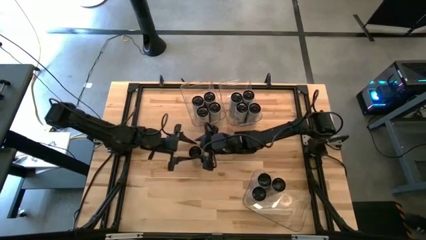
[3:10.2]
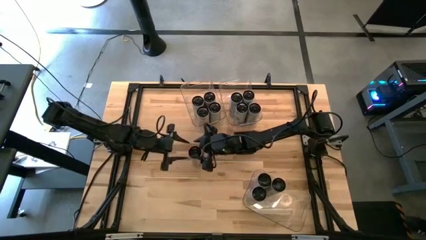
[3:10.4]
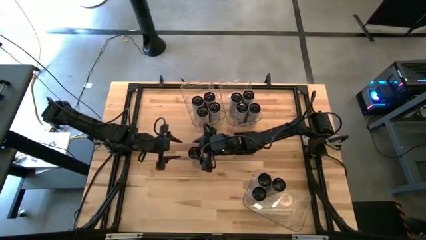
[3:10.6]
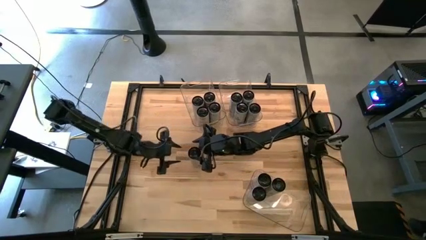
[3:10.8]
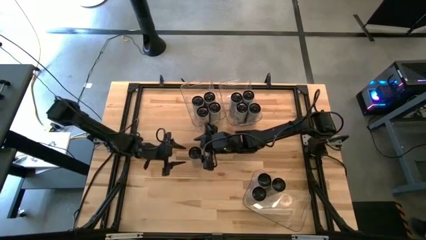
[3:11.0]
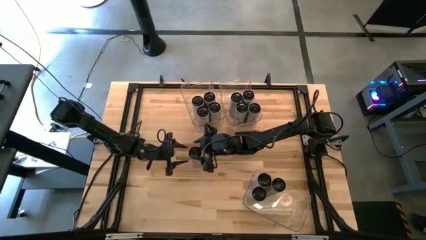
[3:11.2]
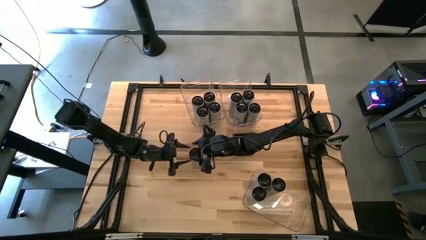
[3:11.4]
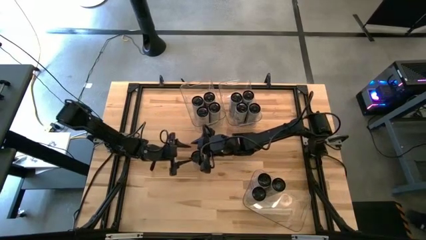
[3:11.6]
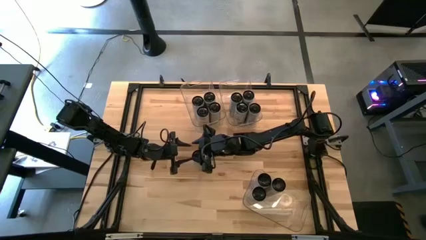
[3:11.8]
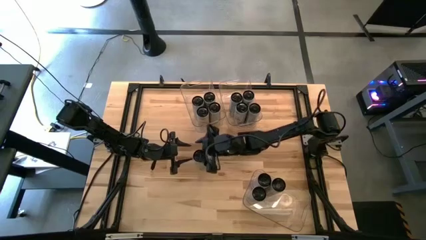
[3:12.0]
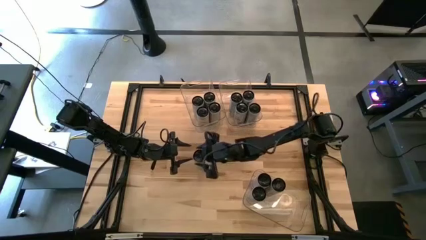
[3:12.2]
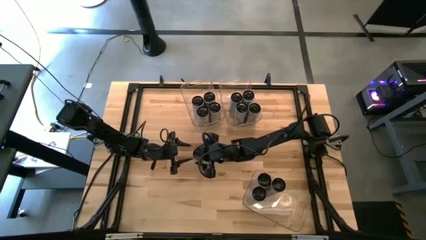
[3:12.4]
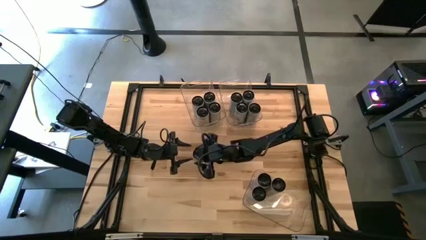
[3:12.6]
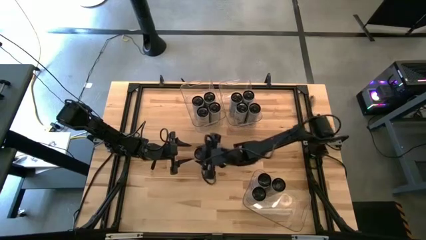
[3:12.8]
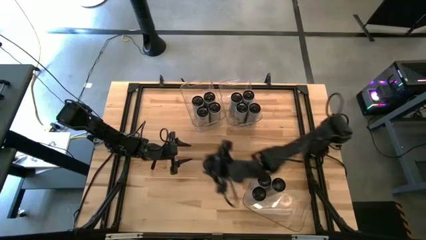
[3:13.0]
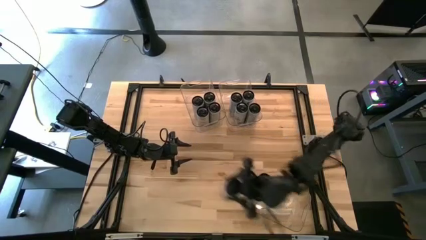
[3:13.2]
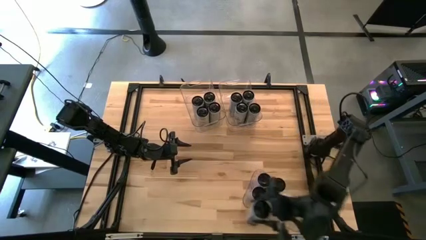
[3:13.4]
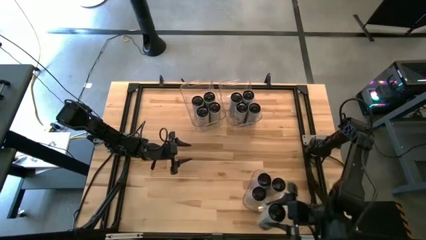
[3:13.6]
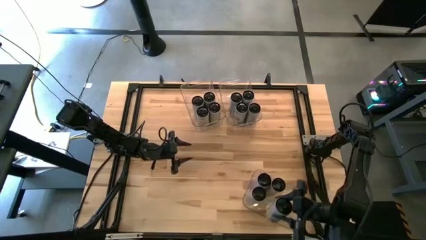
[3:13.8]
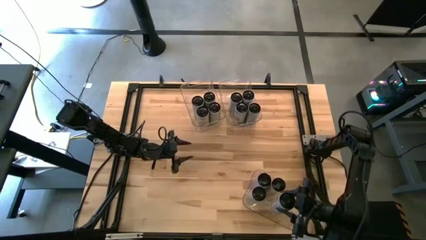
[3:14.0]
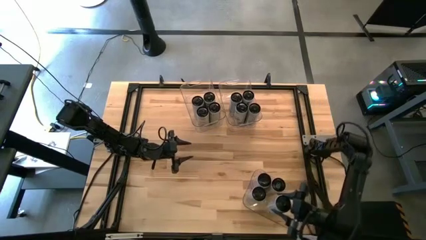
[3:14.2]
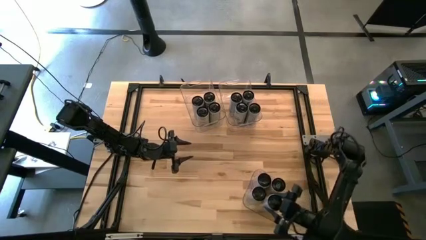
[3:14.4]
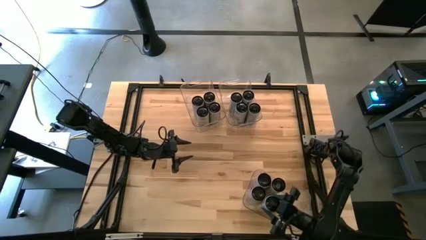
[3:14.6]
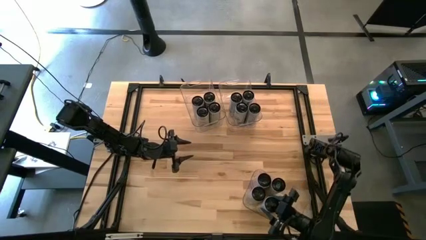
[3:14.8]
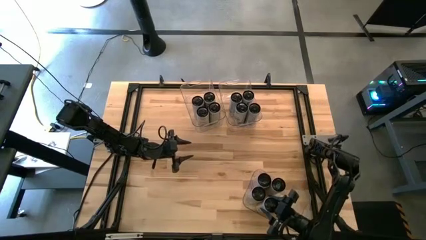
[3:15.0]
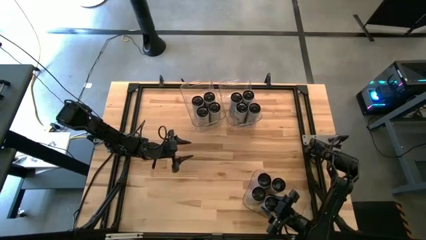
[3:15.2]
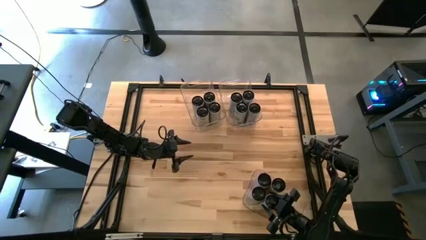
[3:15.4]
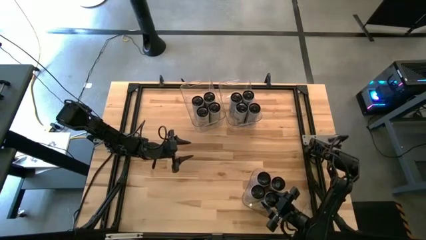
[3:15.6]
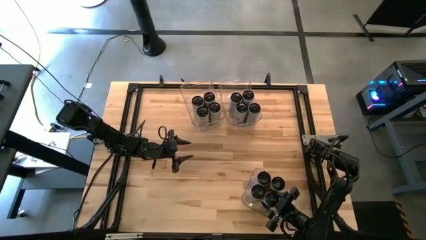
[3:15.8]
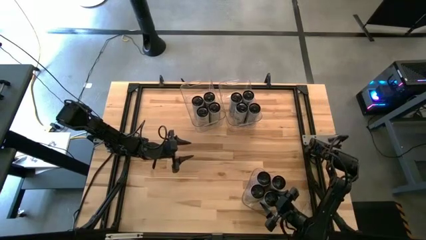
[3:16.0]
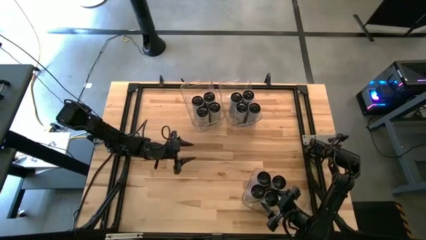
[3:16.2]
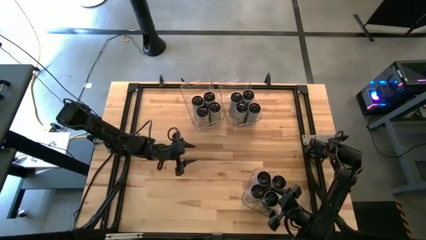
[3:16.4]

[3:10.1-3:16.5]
Task: Sort soda cans
Put the white-pink soda can into the bottom right transparent bin

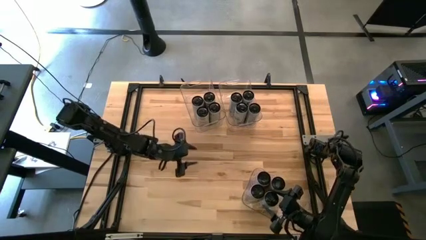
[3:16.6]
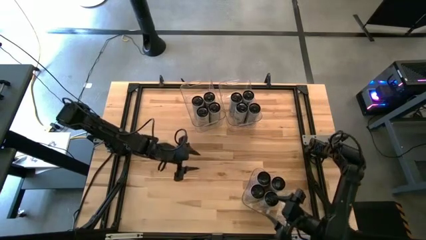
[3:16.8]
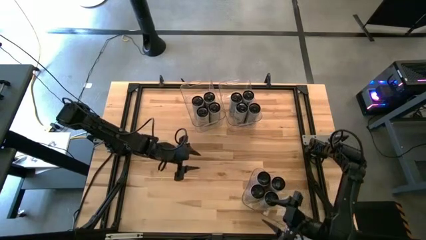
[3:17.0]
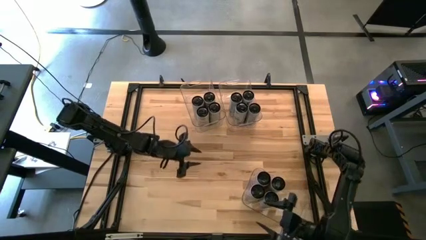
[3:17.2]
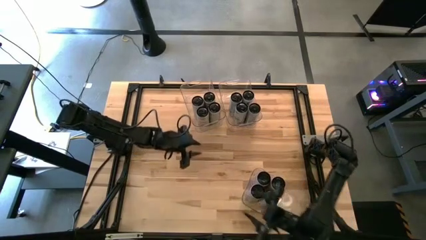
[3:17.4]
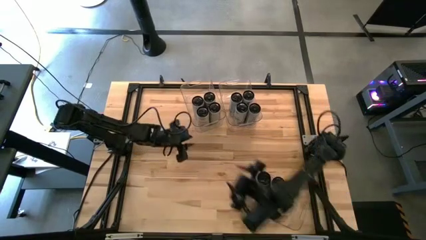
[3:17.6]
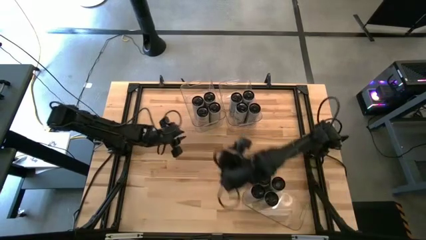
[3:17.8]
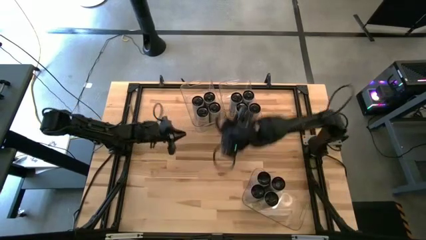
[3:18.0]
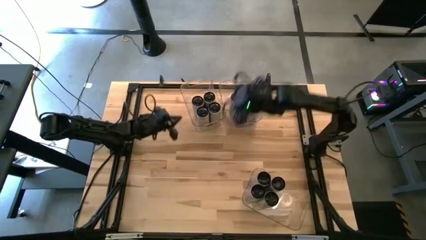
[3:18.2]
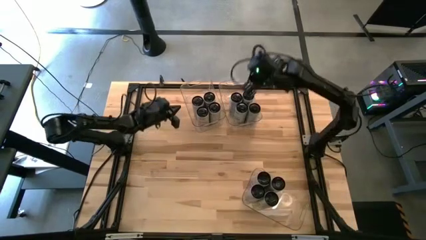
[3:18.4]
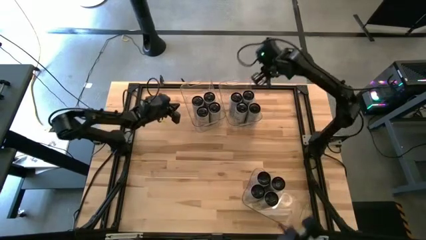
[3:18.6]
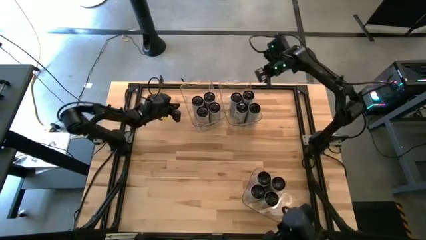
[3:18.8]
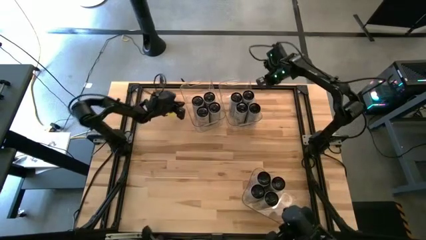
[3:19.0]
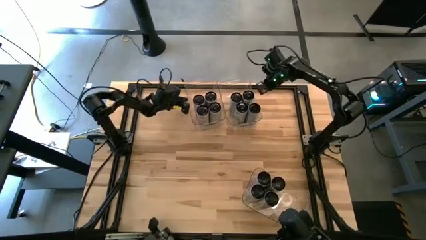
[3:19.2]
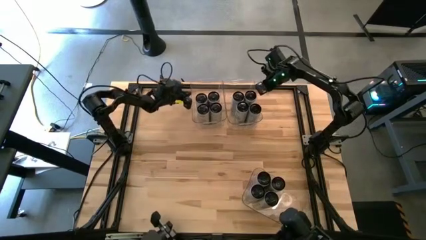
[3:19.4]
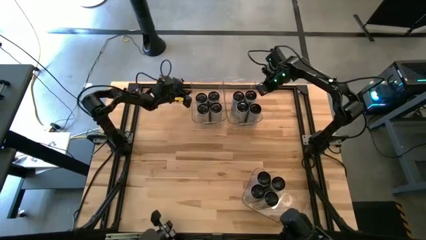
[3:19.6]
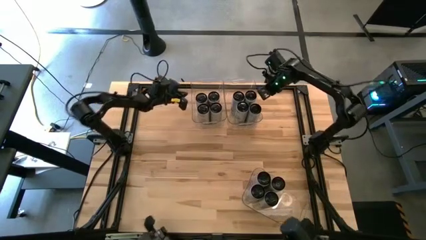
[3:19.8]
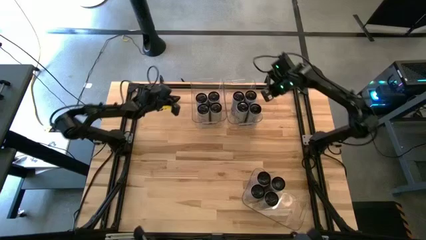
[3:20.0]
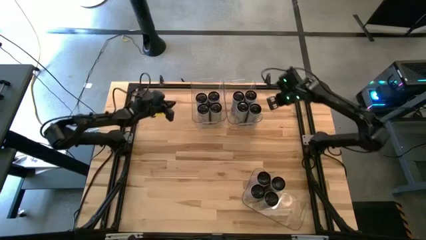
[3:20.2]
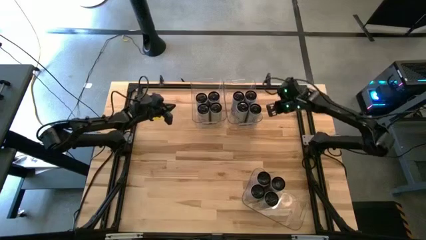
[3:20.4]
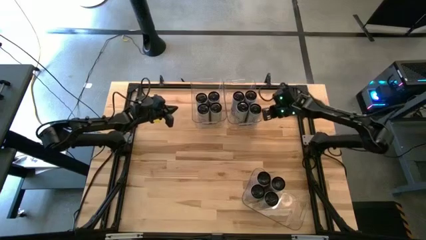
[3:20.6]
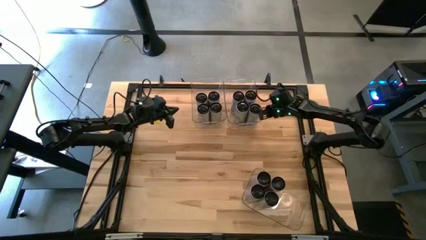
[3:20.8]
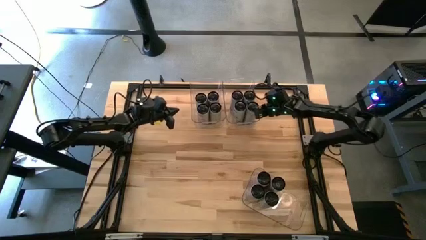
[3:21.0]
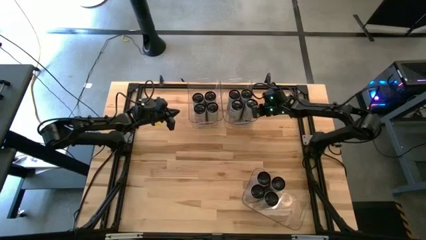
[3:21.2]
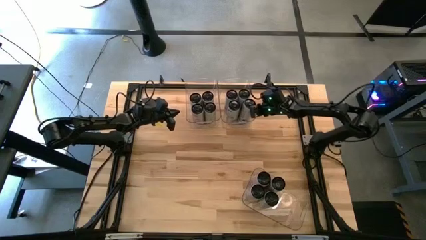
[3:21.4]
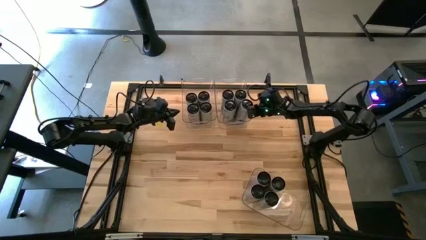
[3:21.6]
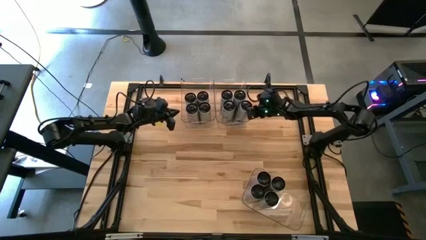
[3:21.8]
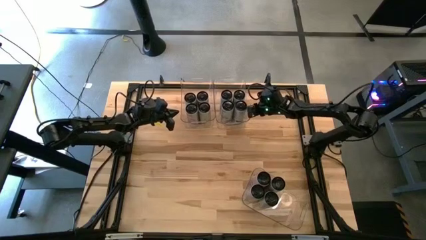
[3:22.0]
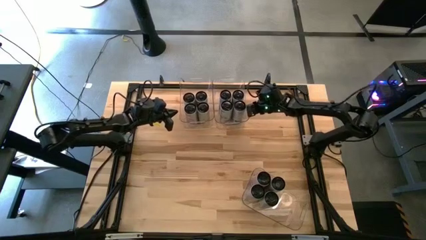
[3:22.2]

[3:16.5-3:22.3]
Adjust the transparent bins on the table

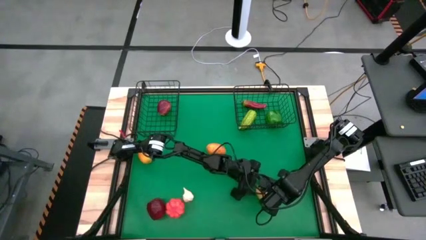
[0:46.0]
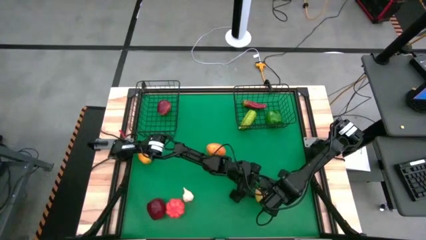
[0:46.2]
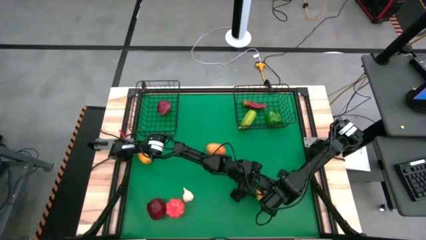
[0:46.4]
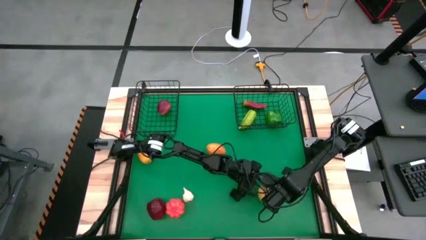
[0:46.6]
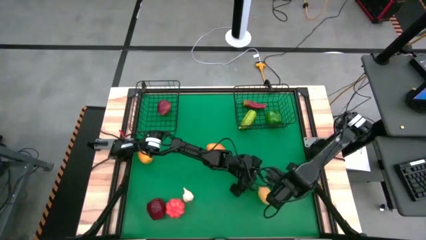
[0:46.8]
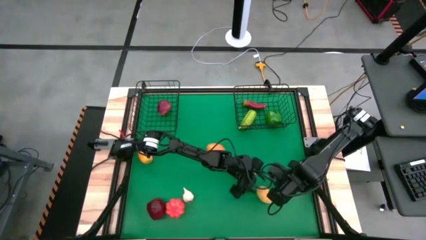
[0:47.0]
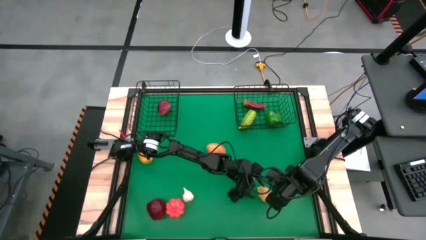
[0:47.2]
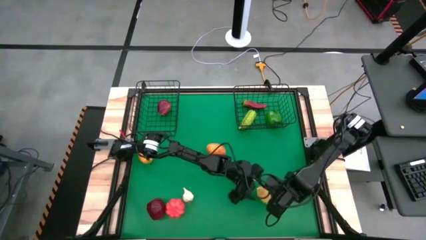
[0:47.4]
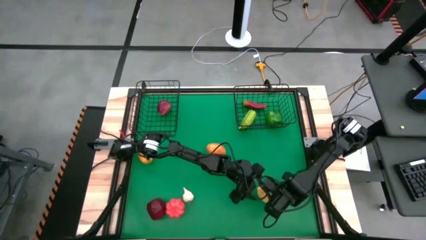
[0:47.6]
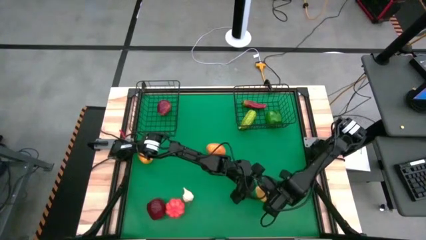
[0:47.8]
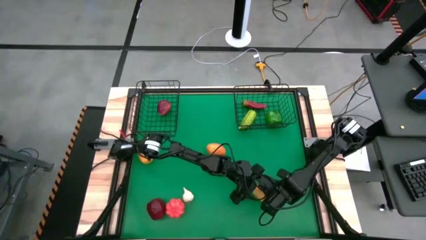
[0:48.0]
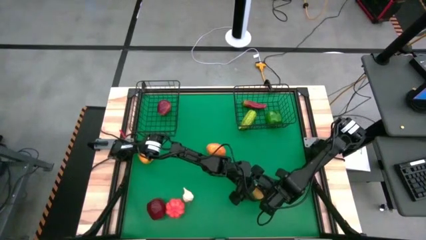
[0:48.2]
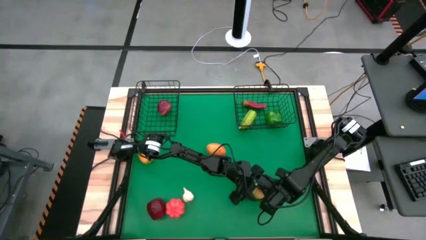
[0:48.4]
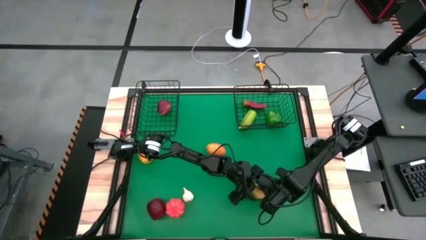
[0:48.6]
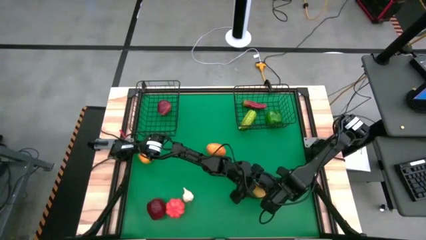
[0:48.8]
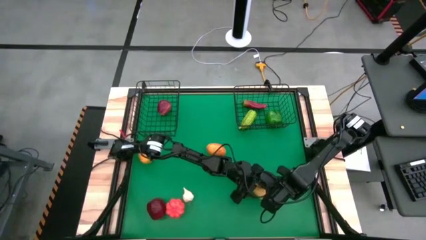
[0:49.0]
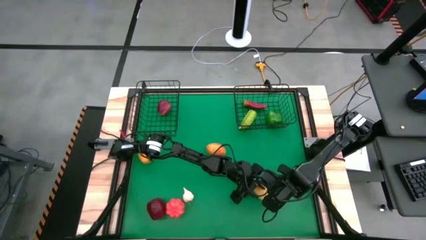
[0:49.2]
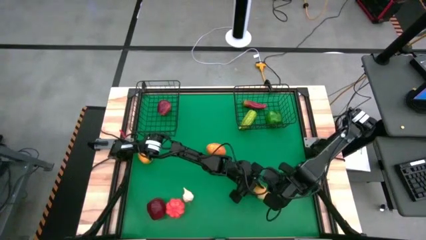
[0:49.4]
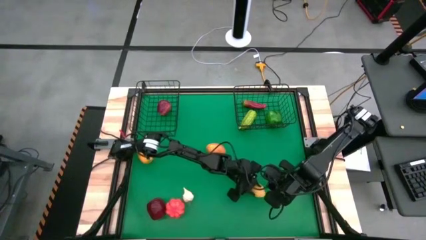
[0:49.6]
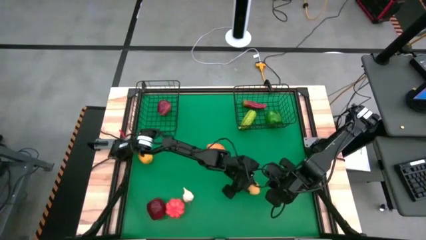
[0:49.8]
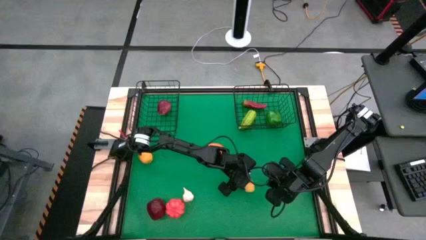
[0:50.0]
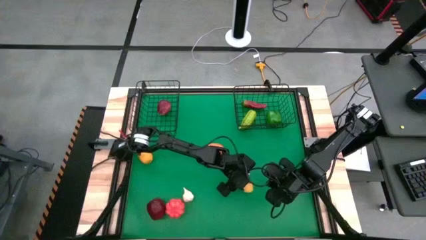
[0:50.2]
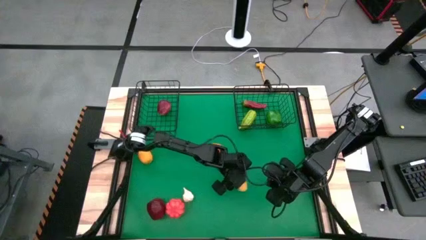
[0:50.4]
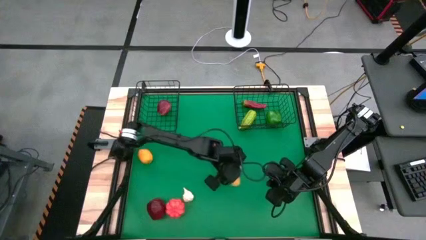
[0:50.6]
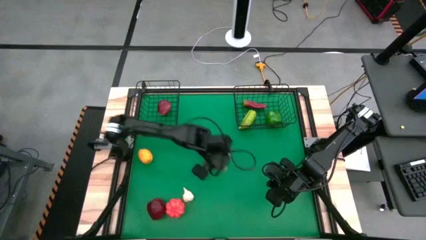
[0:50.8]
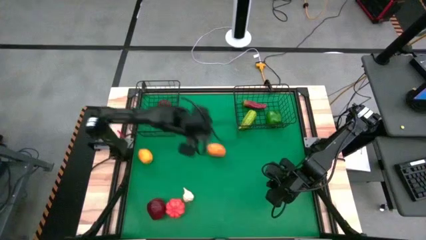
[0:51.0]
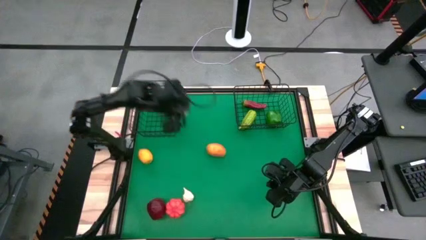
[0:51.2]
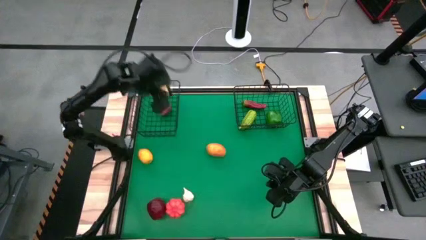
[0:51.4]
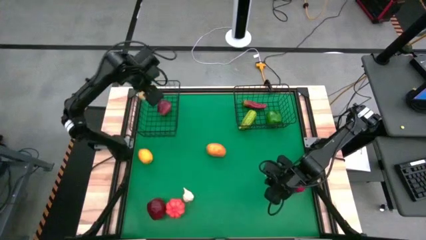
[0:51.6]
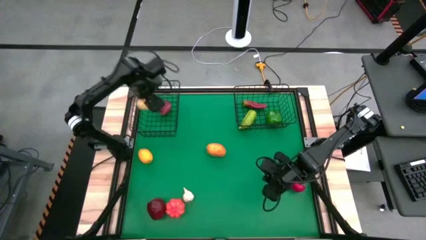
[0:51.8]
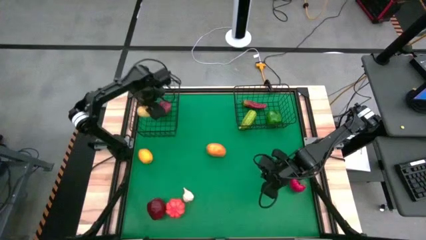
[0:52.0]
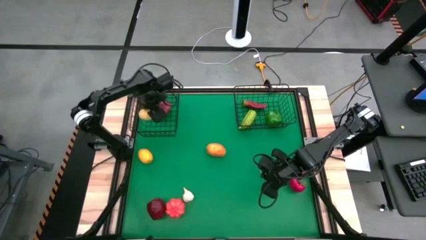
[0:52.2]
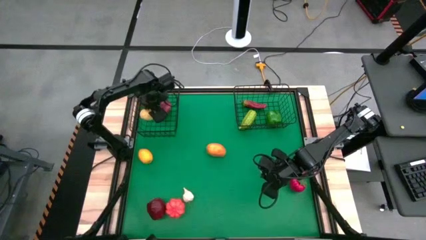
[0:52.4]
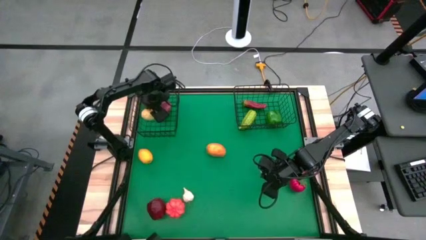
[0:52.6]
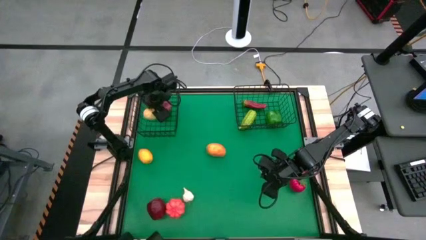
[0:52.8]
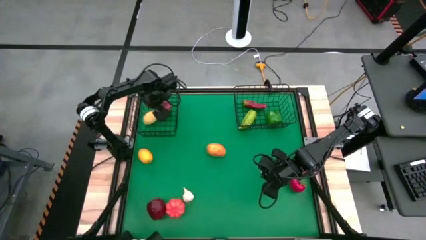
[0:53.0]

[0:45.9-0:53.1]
Task: Sort produce into baskets
Put the right yellow lemon into the left wire basket
